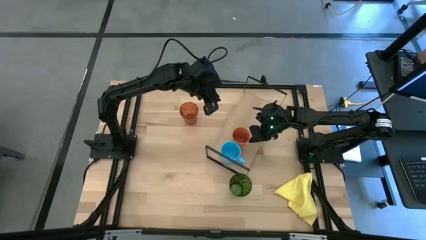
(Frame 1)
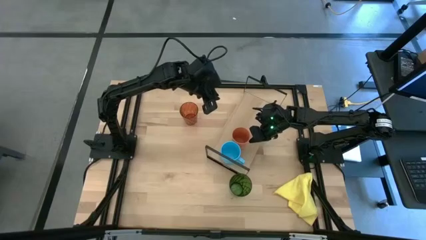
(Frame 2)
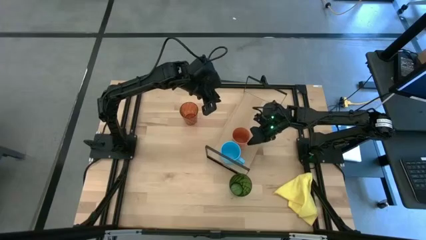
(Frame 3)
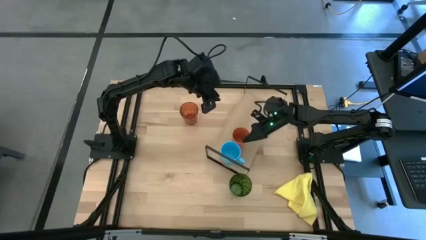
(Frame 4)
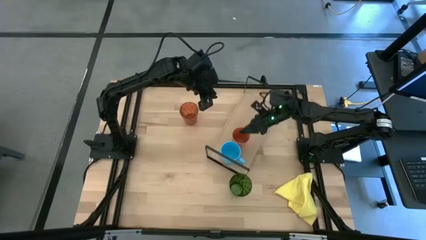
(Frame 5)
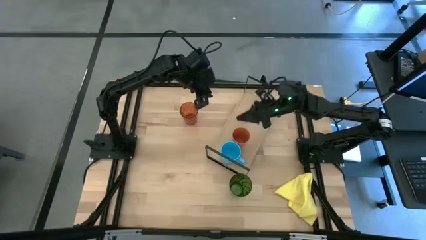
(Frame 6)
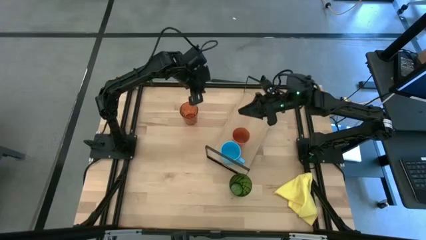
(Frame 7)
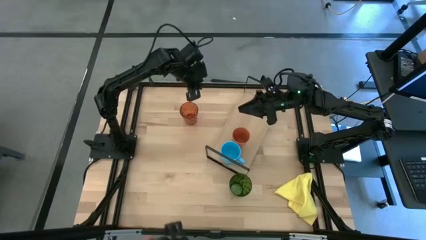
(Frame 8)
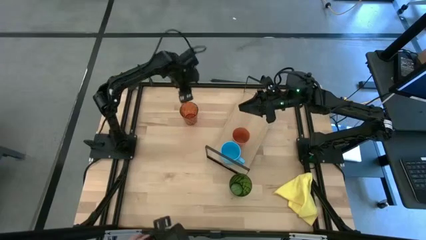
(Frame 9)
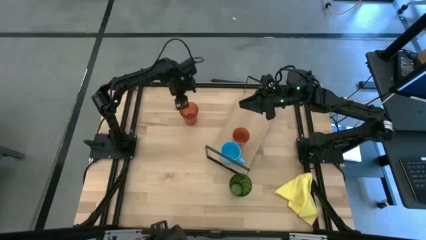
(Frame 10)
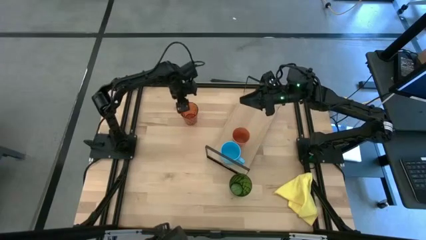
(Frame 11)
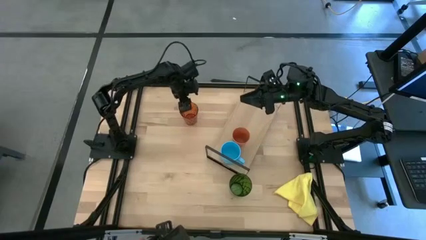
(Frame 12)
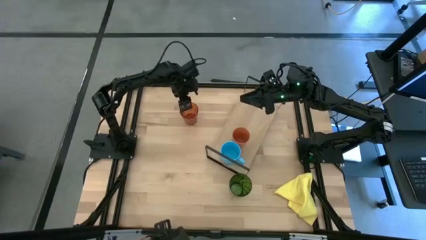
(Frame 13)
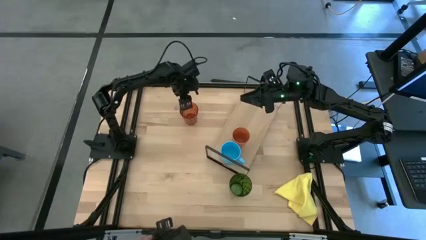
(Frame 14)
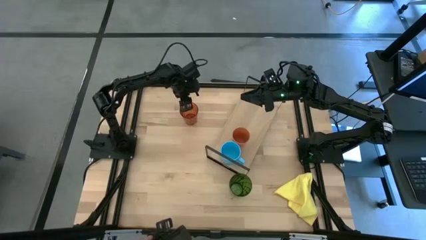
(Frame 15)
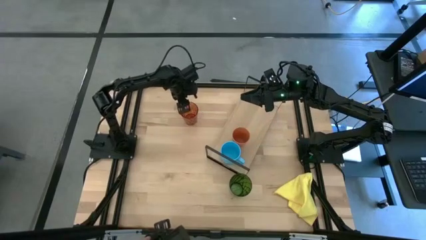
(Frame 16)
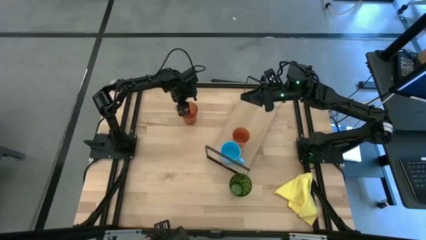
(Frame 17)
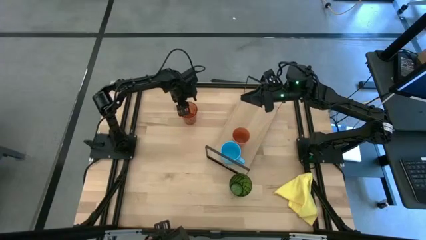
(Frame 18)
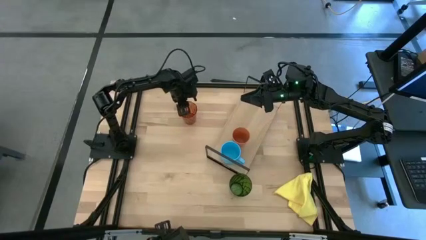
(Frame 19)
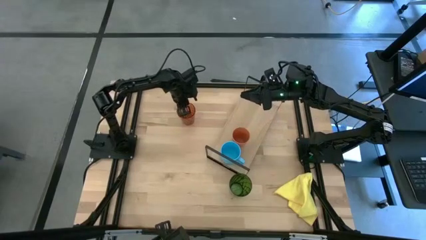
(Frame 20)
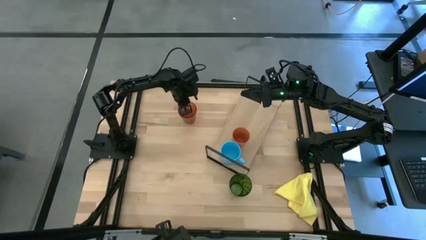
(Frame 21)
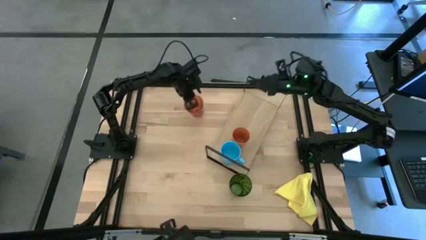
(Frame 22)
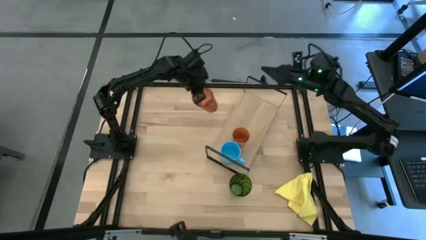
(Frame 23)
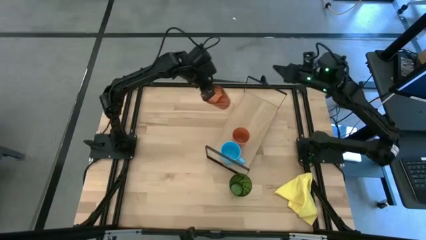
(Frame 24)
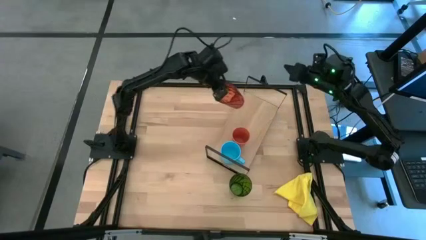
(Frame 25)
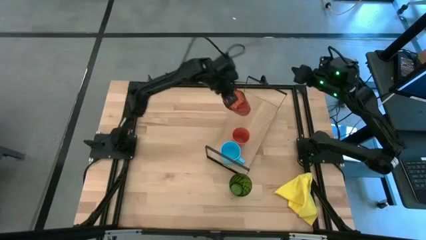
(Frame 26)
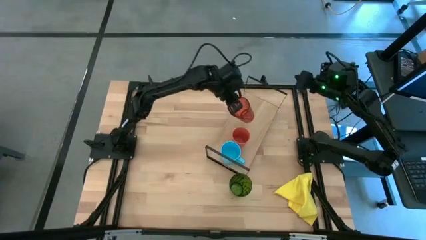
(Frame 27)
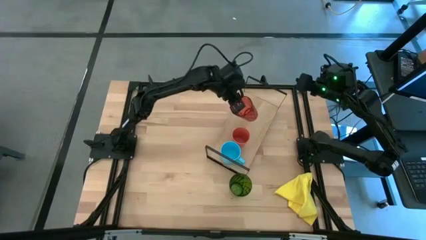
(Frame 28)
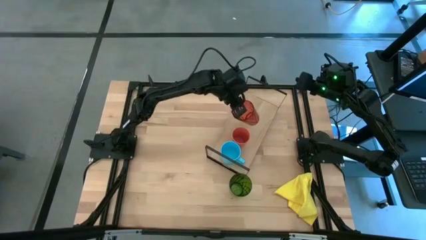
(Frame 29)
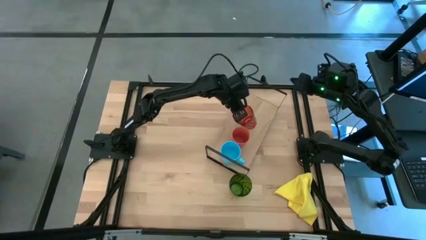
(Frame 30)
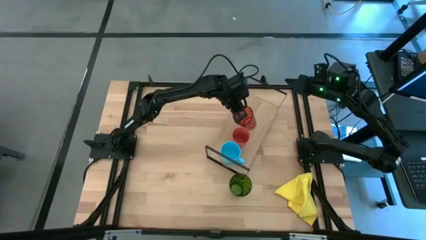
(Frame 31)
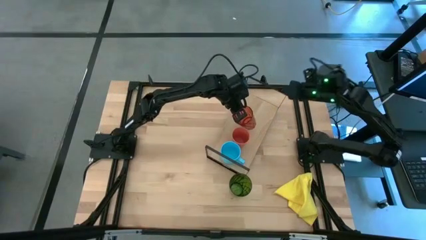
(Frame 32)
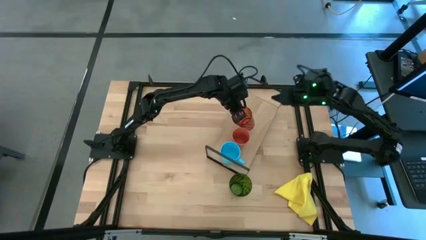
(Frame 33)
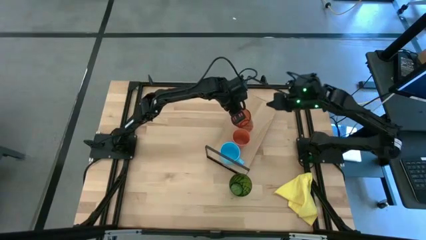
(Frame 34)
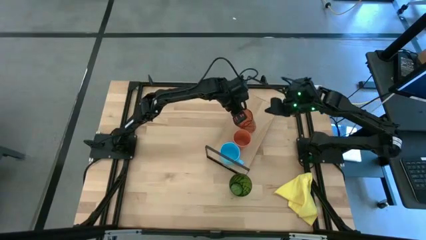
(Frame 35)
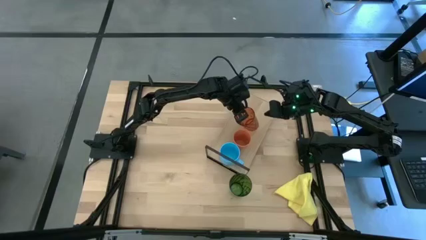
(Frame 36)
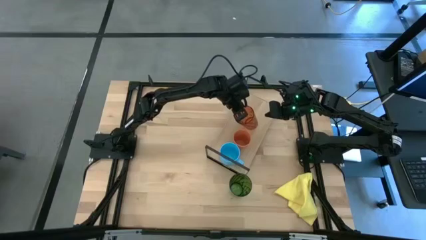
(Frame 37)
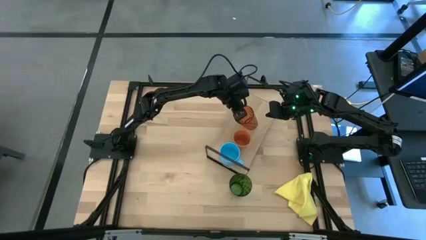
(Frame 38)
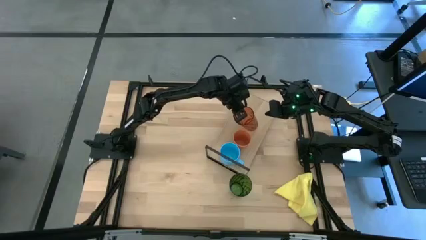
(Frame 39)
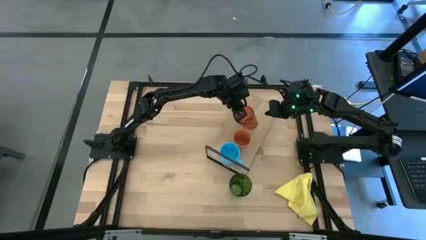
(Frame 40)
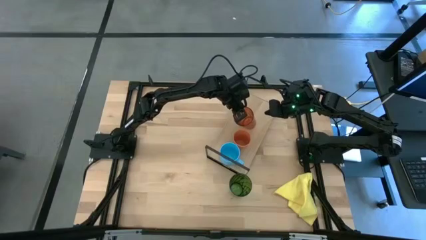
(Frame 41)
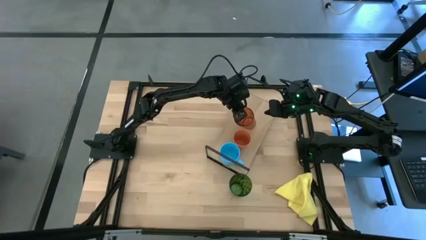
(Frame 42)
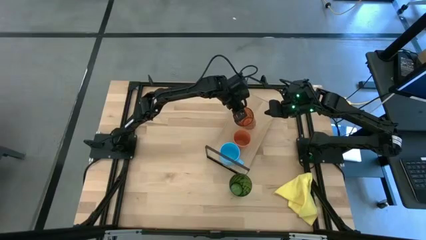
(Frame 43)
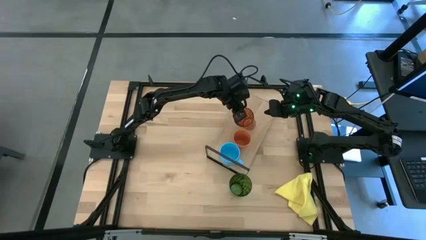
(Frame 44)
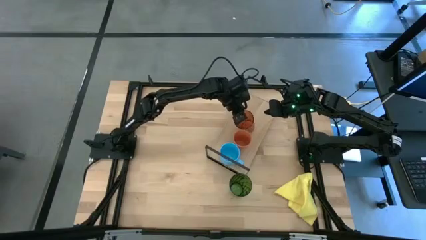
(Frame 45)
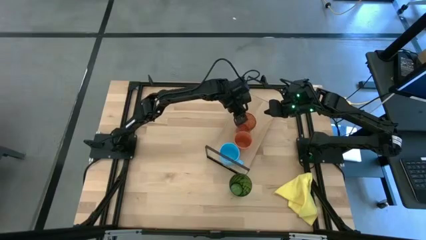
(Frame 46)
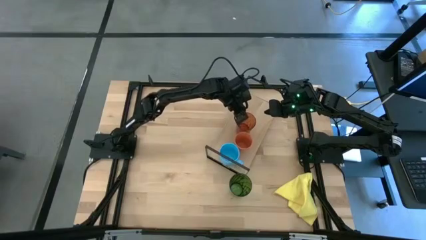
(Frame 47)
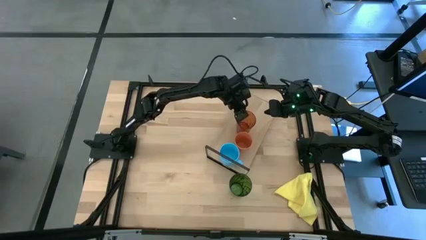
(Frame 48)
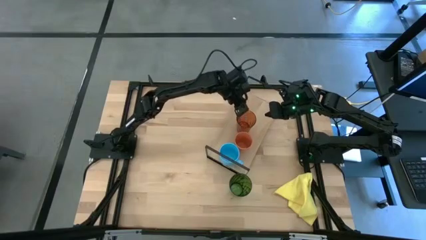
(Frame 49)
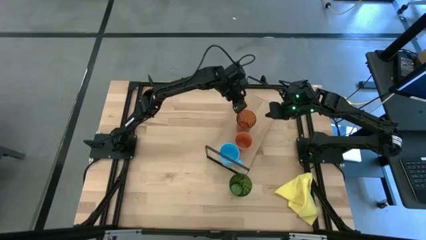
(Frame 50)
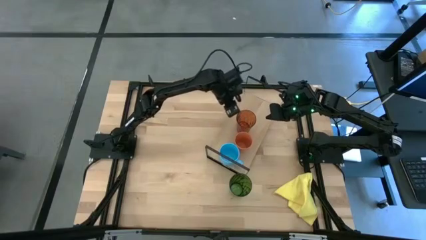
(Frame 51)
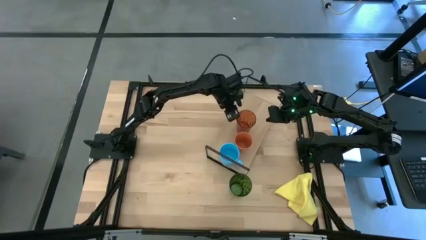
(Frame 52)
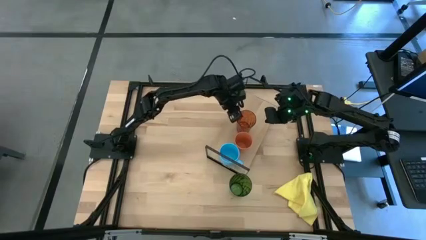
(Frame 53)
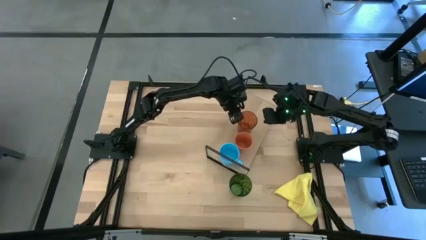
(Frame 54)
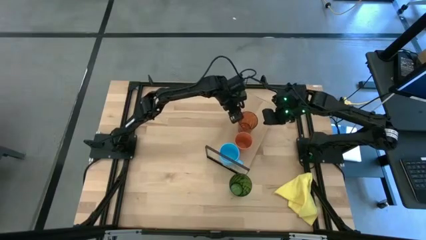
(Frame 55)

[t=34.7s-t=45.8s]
Task: Stack small to large cups/mugs on shelf
Put the brown cup on the shelf

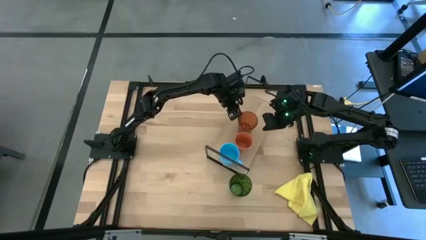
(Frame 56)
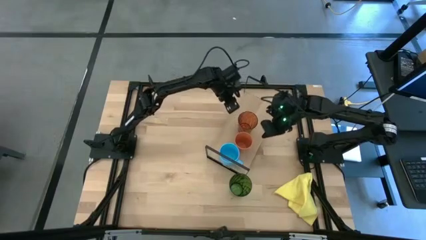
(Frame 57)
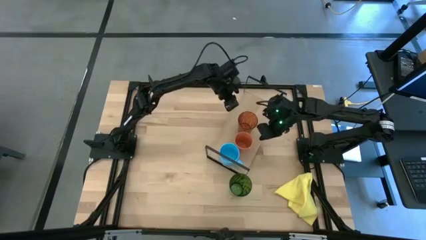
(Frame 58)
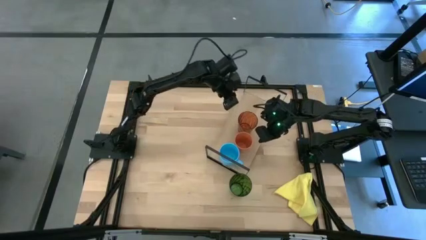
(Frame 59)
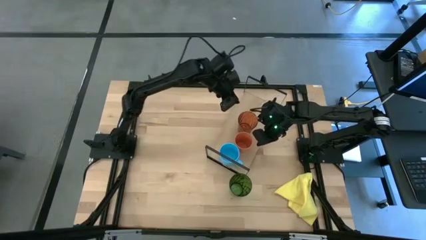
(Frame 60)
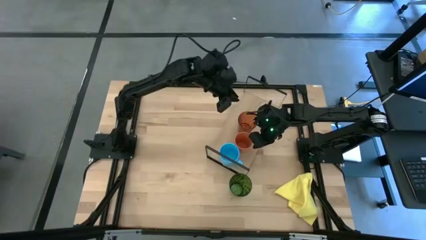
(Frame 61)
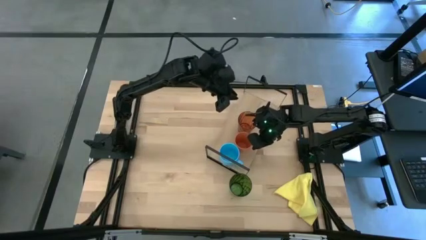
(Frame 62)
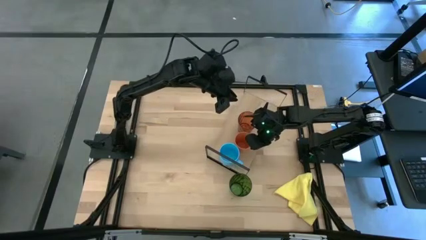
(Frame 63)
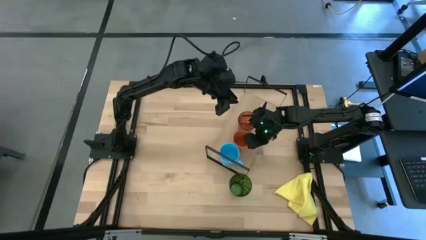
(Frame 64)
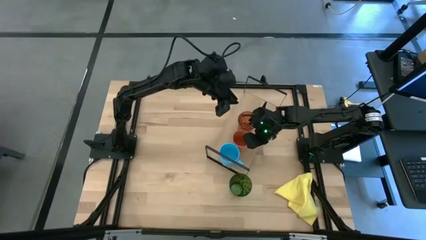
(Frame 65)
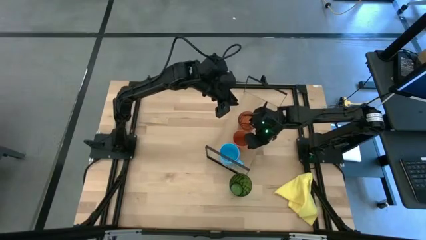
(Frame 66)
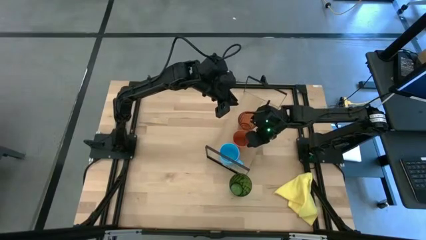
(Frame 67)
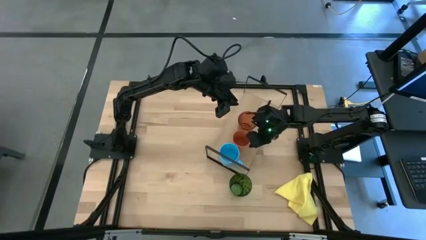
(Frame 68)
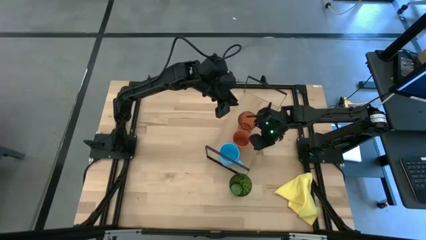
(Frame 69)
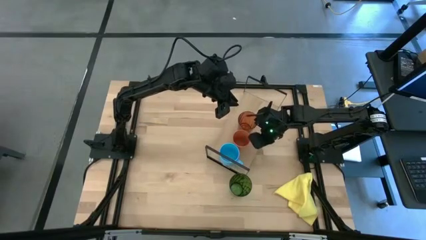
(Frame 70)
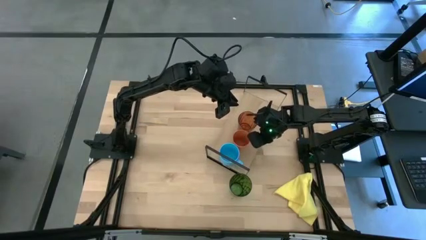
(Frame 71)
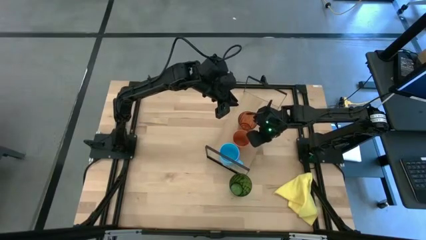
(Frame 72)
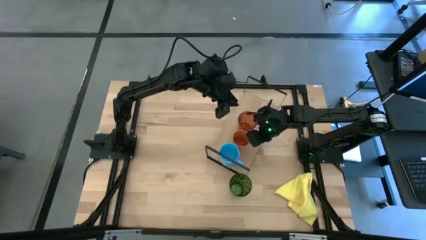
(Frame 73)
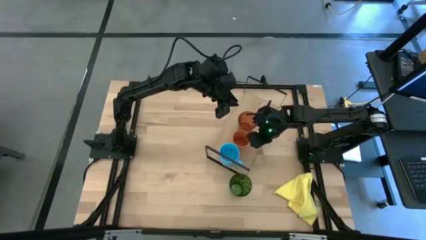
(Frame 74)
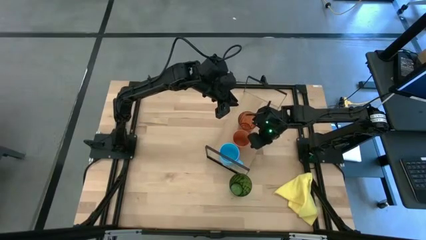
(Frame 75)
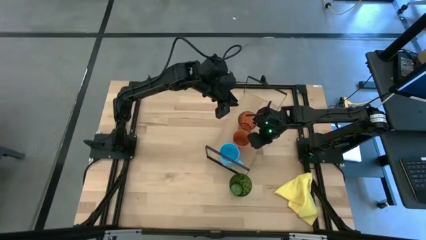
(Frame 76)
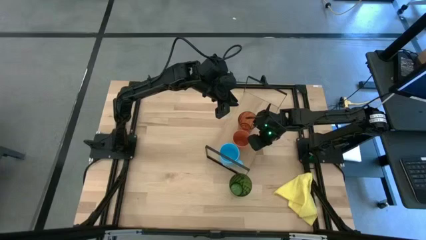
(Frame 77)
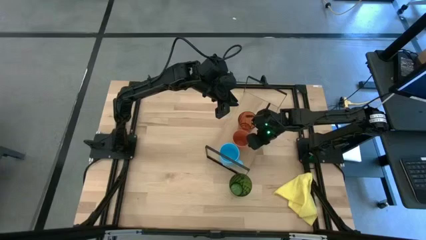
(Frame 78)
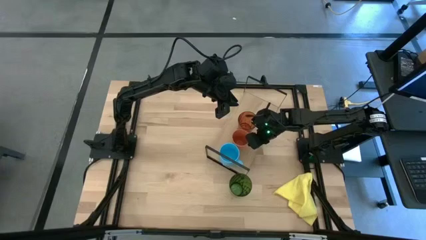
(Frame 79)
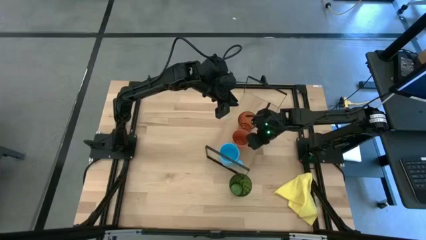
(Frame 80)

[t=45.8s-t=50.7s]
Adjust the orange cup on the shelf
